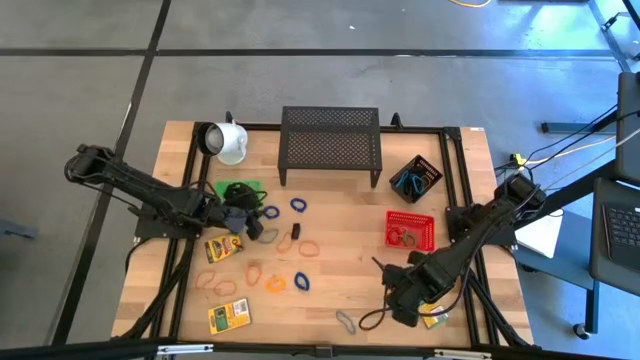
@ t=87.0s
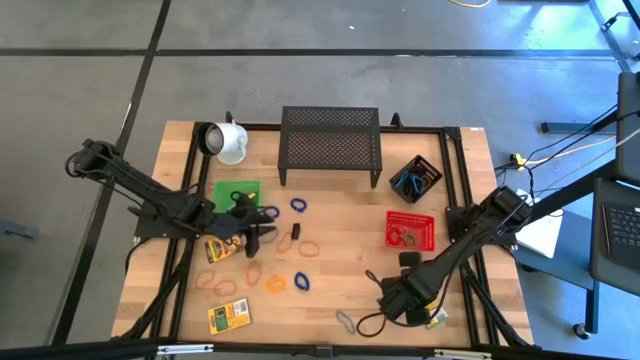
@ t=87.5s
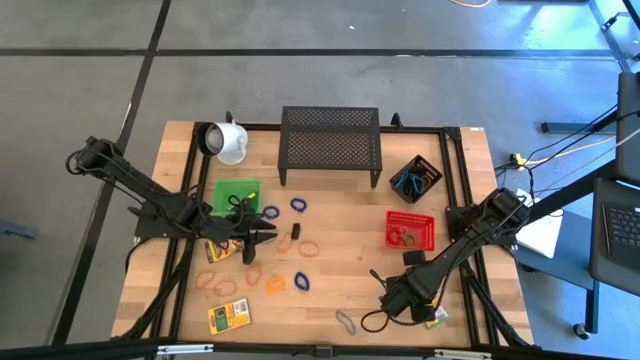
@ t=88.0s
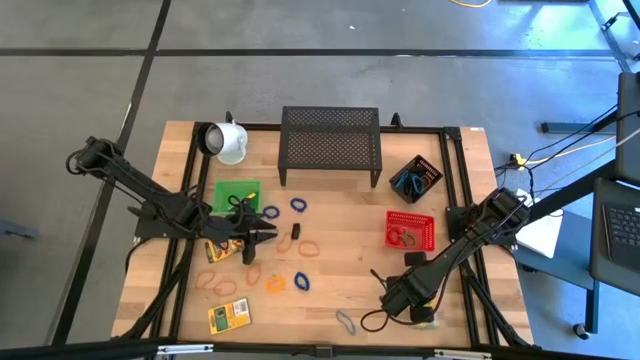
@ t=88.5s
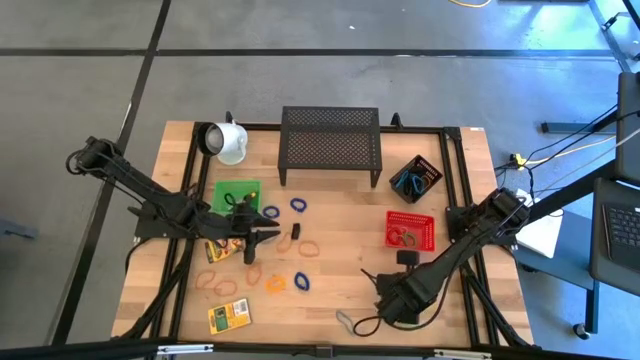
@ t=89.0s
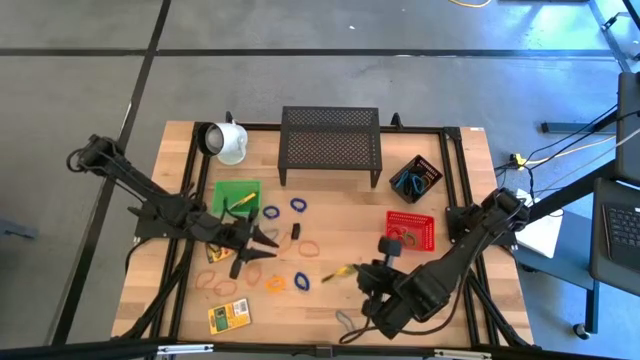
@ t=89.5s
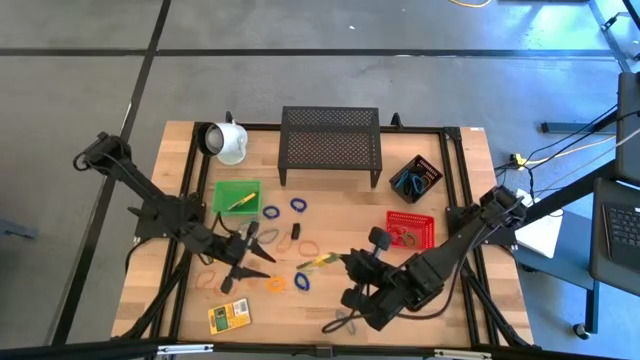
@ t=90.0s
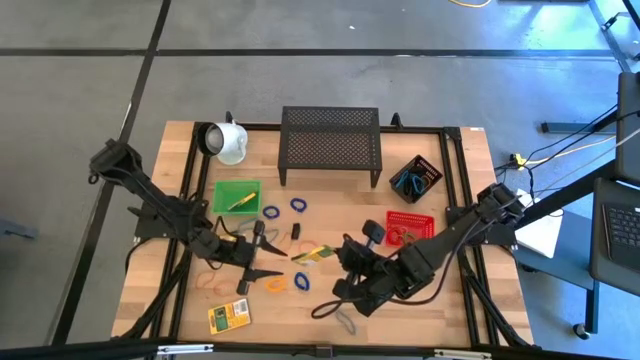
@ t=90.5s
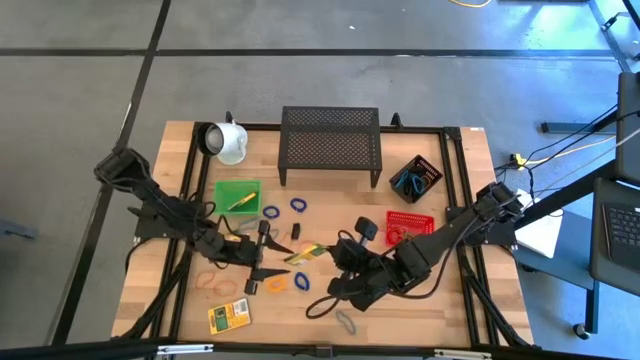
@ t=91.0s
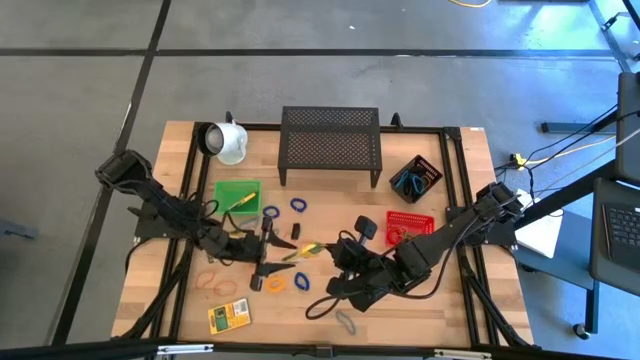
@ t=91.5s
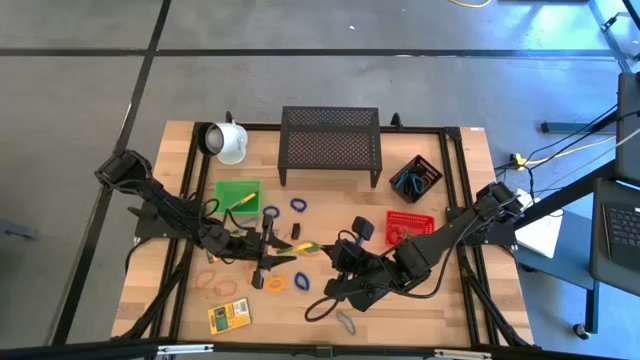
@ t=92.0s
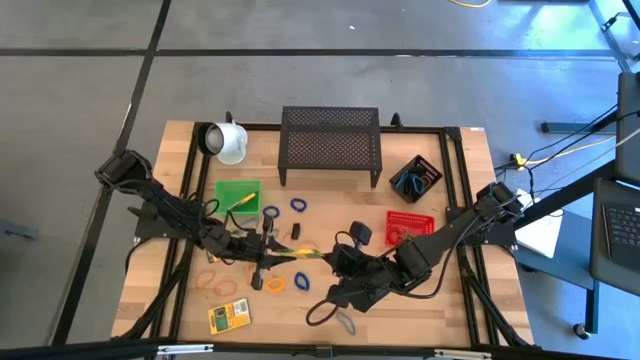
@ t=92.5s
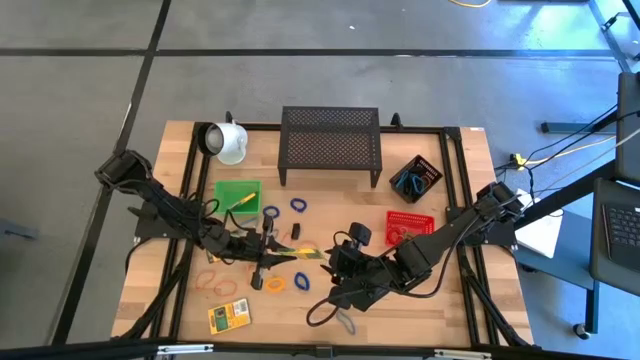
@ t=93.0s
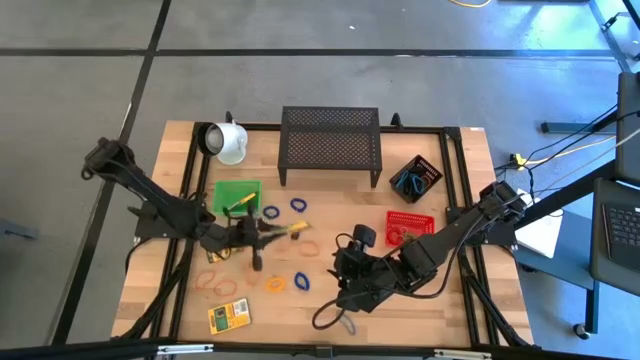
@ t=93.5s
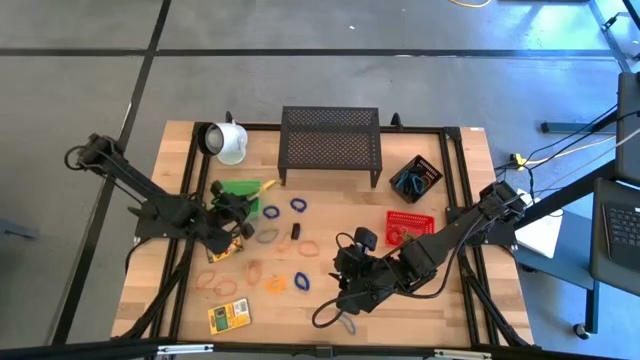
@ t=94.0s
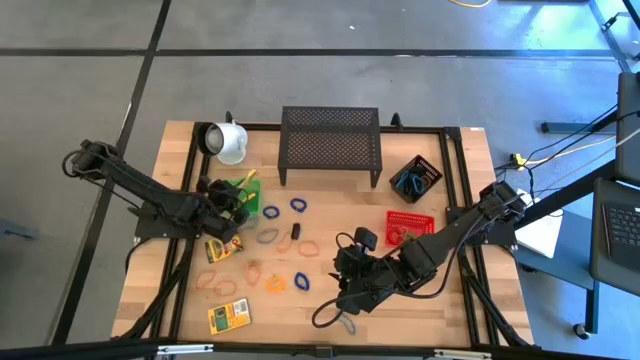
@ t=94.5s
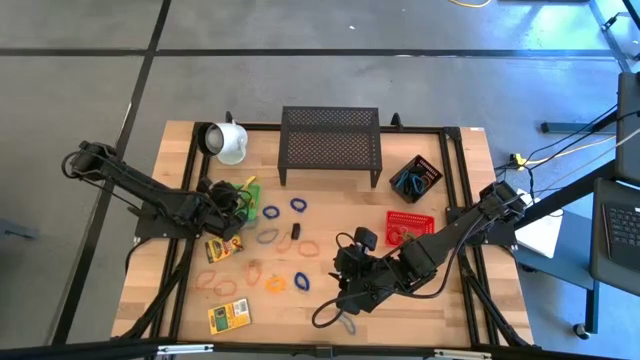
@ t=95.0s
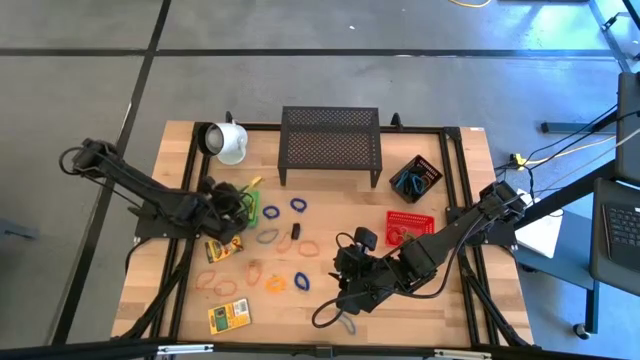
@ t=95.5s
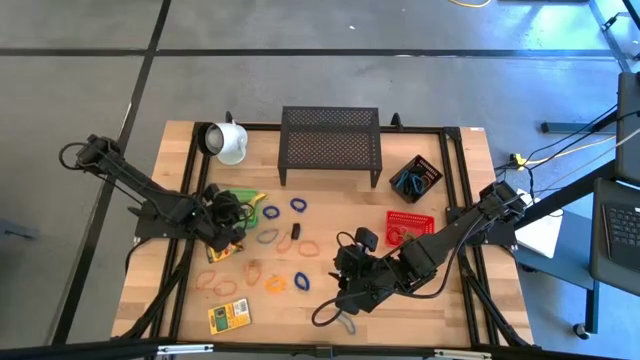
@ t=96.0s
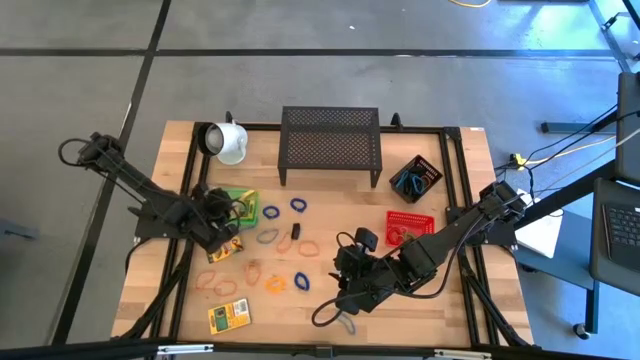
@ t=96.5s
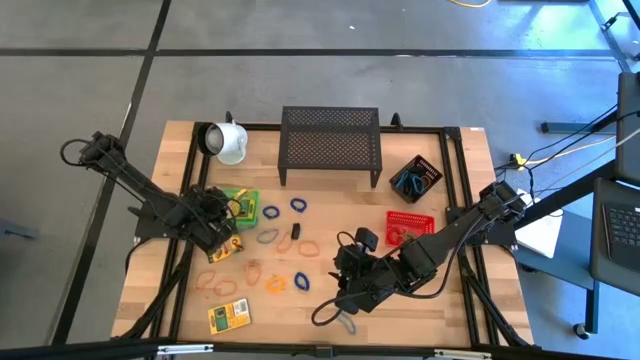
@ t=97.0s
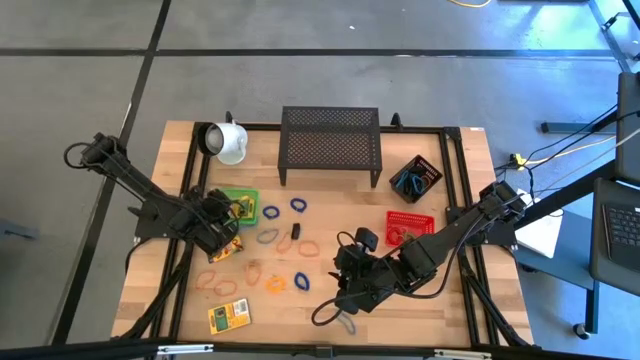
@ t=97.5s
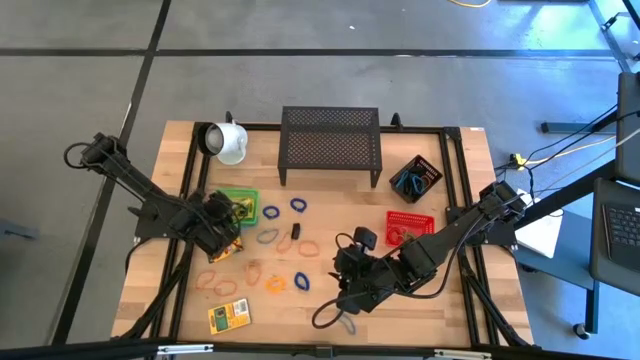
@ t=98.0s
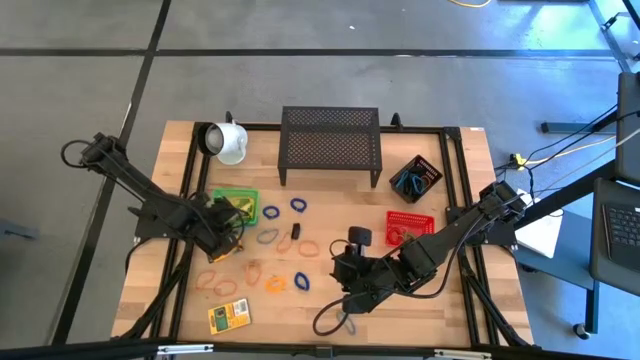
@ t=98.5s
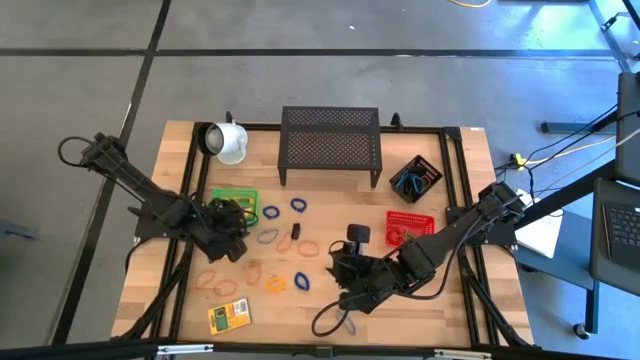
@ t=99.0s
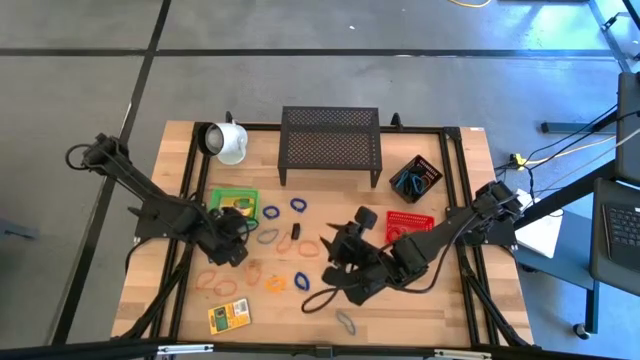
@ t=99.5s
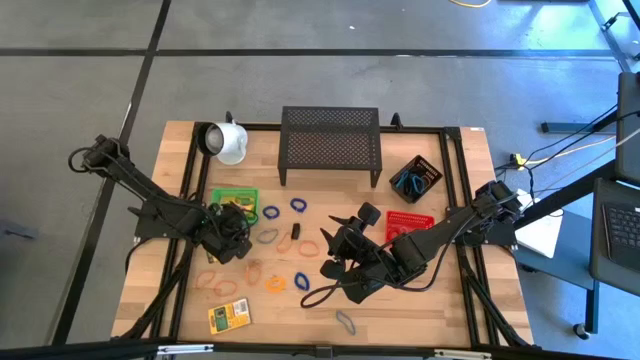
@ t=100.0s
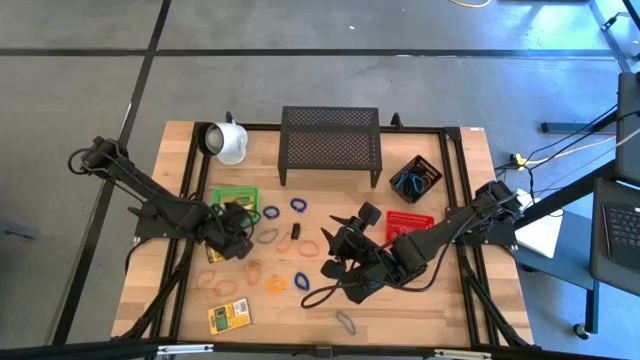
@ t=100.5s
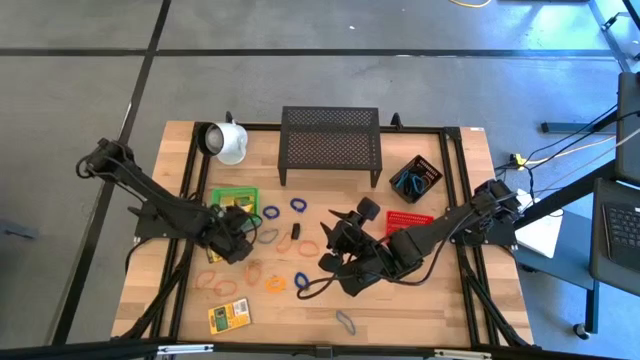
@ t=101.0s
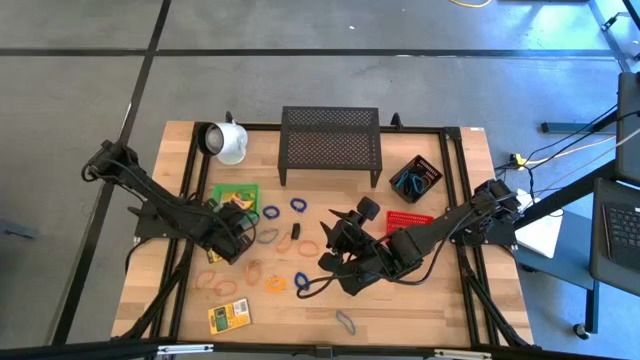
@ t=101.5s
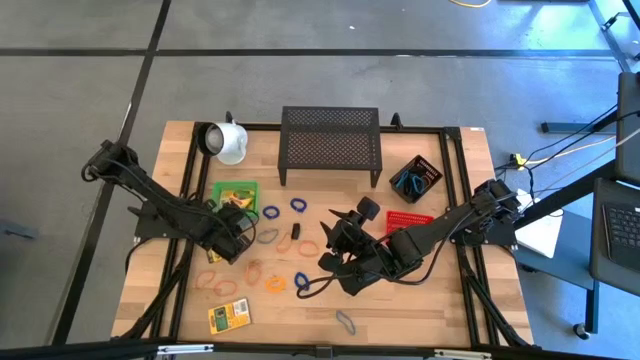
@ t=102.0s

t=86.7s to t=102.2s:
Task: Pick & Place Office Desk Supplies
Put the pack of crayons into the green bin

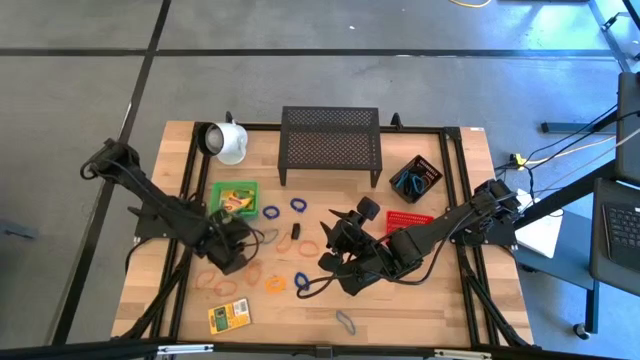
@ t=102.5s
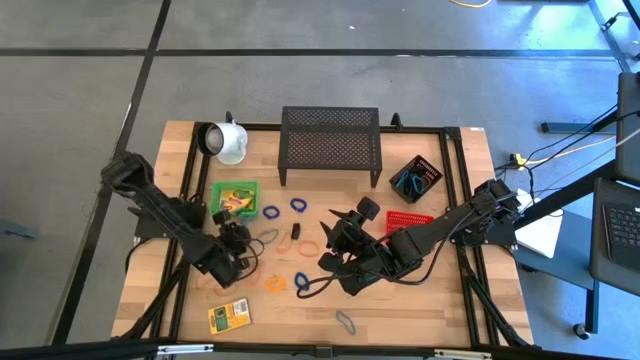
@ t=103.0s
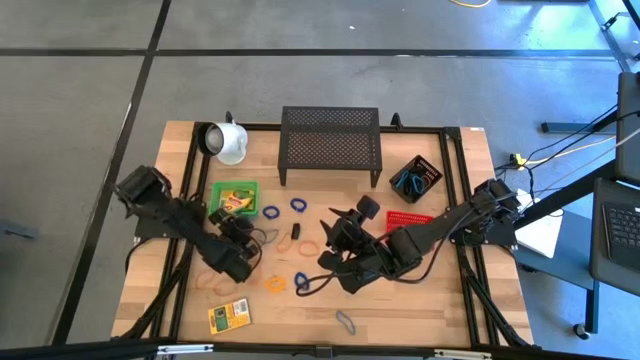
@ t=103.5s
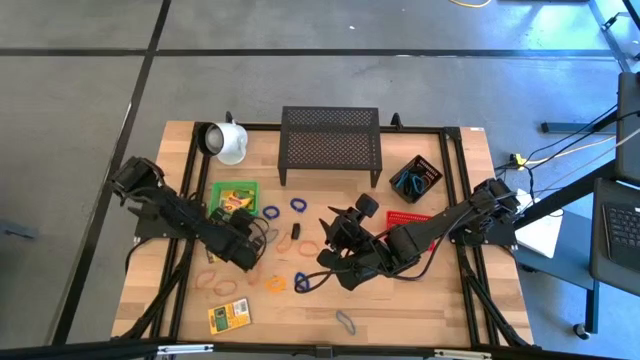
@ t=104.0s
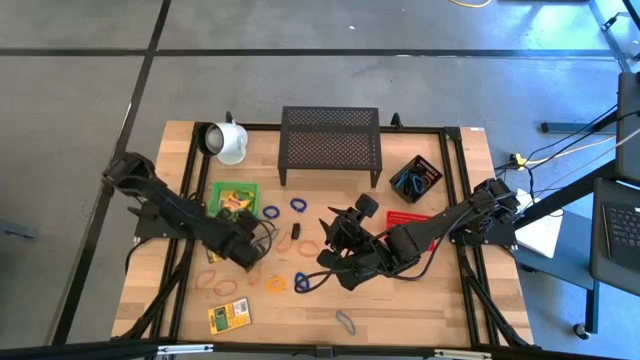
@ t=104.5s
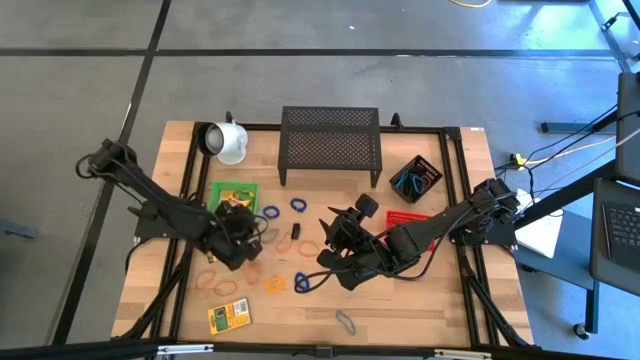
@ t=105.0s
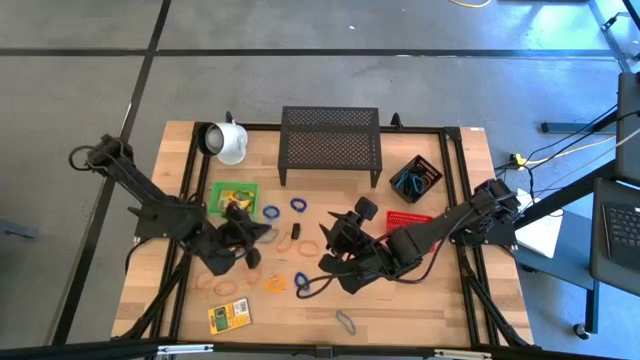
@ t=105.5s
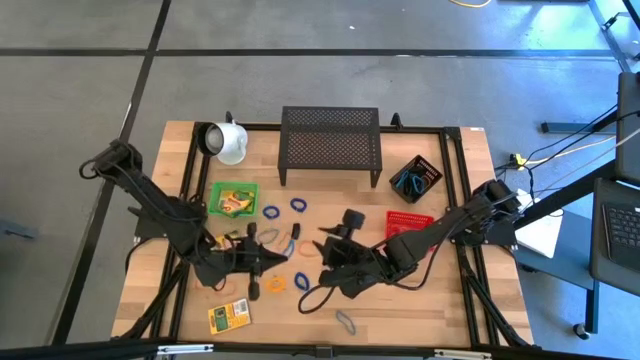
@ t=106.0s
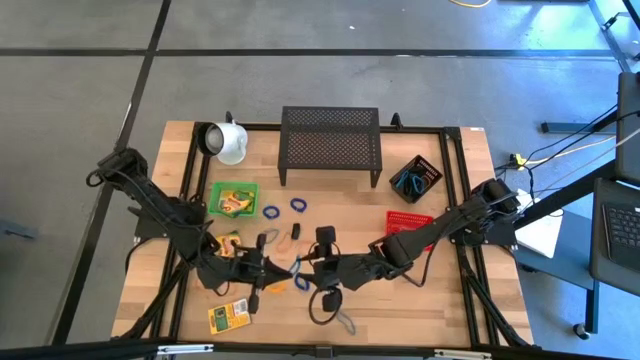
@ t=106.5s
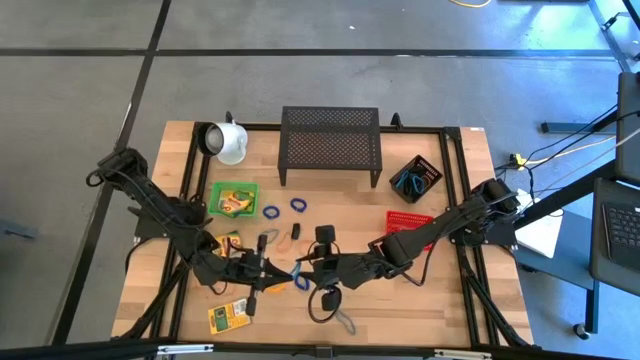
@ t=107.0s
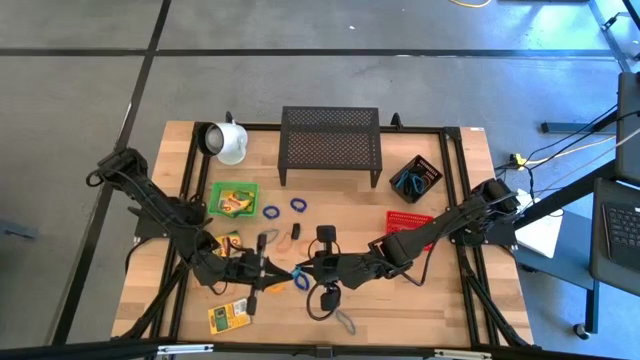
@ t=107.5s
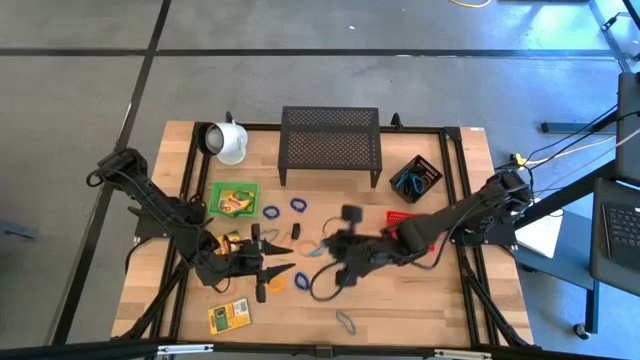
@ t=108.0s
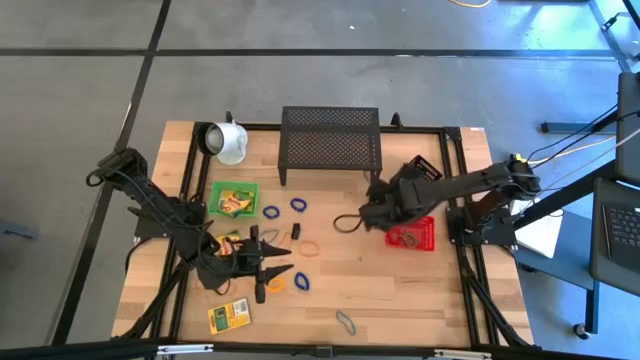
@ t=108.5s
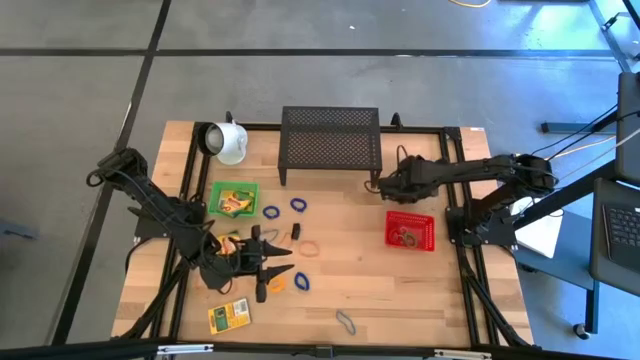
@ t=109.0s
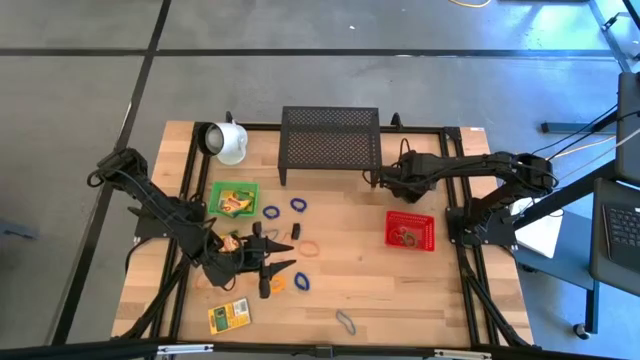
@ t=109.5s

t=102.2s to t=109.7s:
Put the blue rubber band into the black bin
